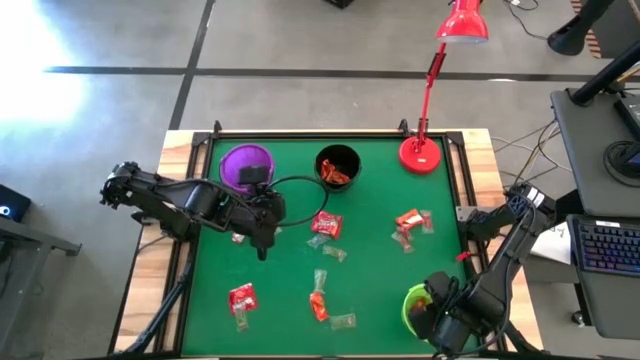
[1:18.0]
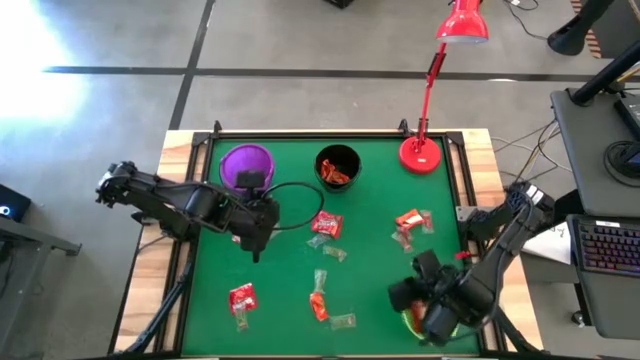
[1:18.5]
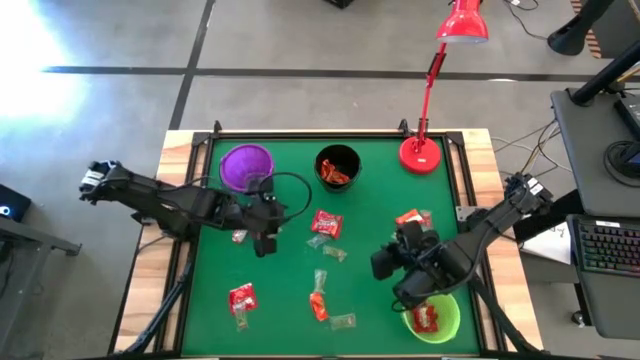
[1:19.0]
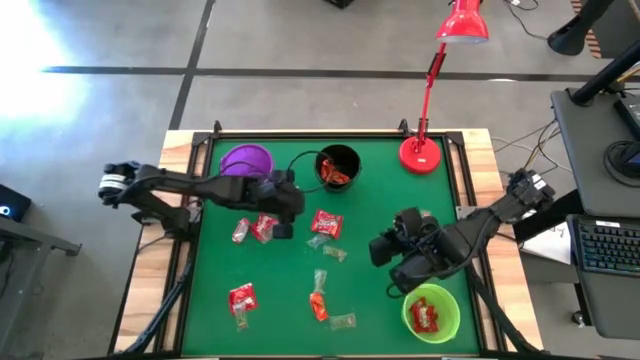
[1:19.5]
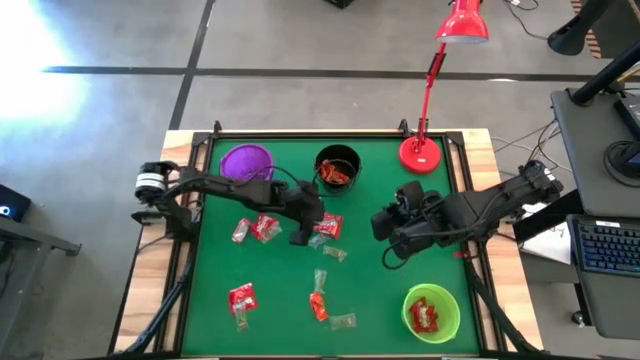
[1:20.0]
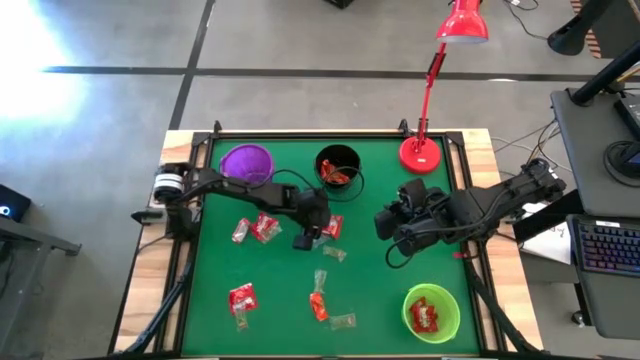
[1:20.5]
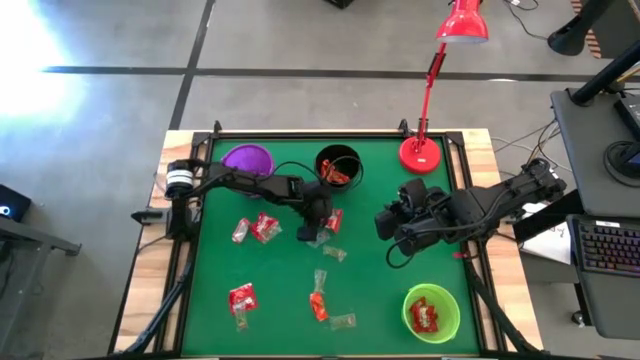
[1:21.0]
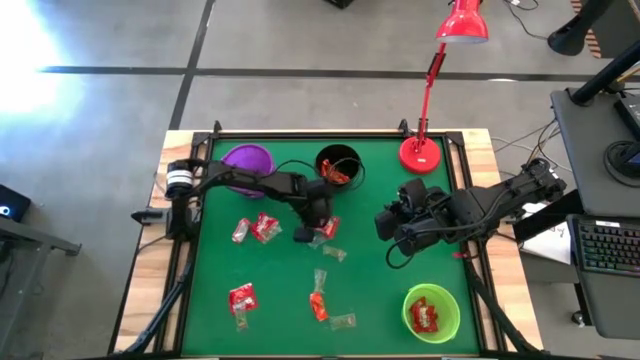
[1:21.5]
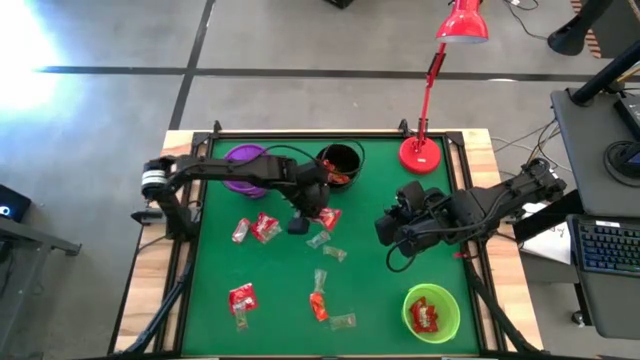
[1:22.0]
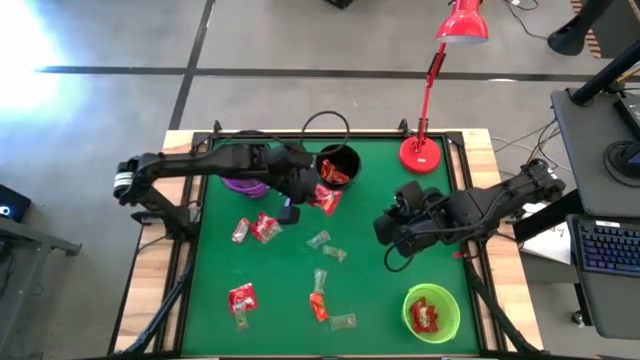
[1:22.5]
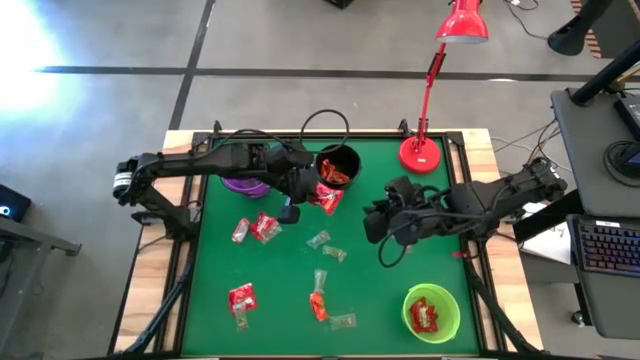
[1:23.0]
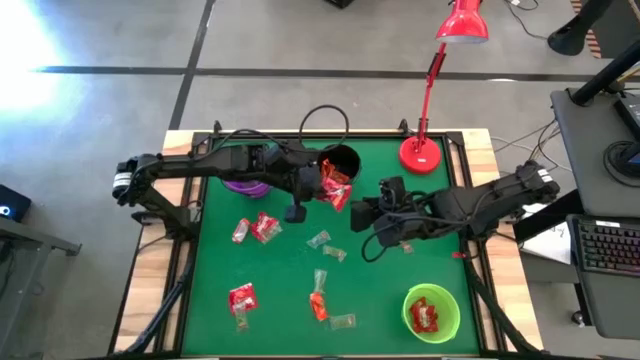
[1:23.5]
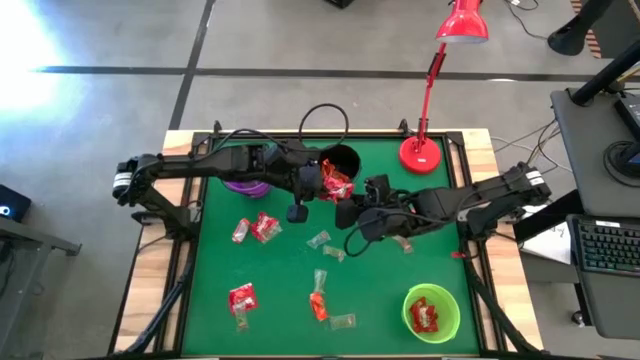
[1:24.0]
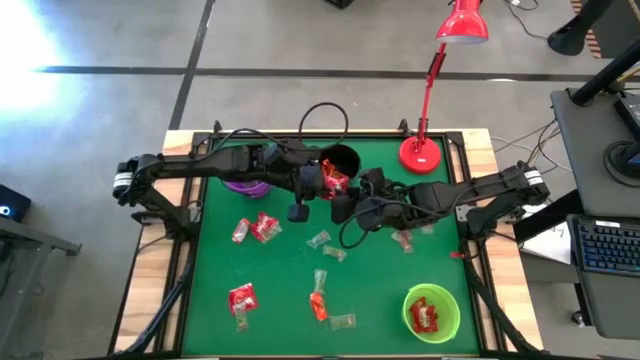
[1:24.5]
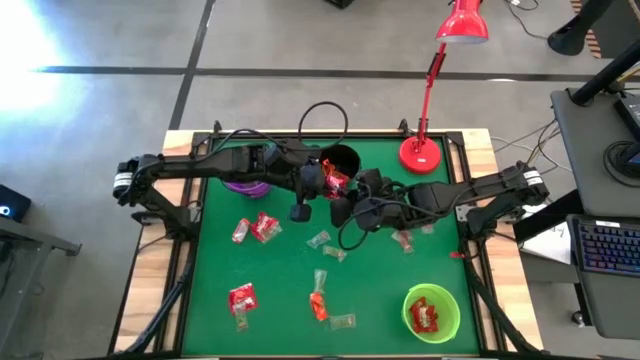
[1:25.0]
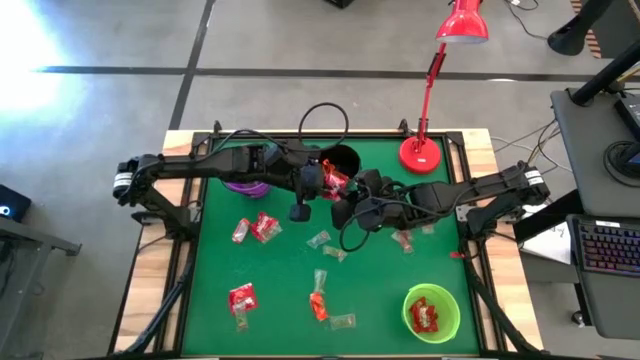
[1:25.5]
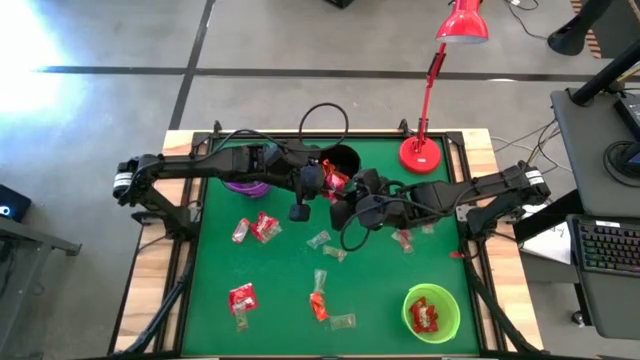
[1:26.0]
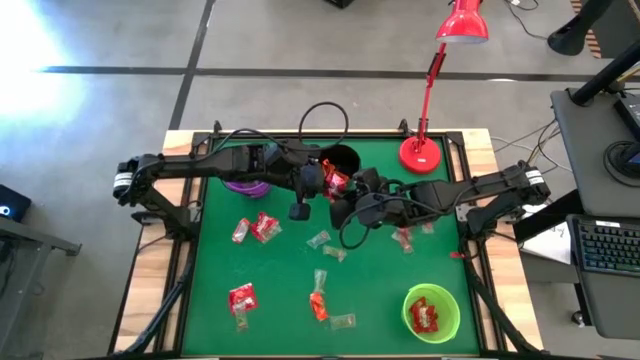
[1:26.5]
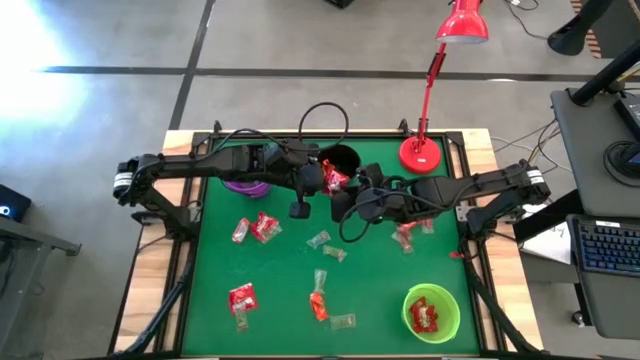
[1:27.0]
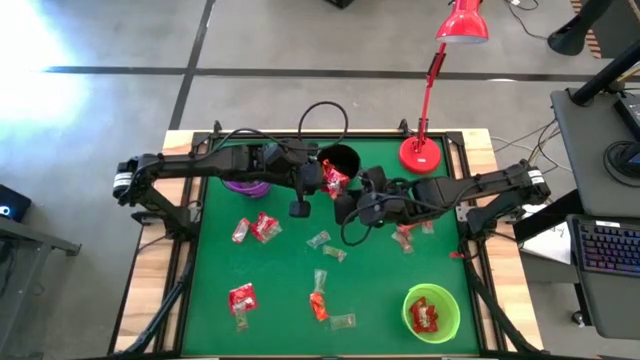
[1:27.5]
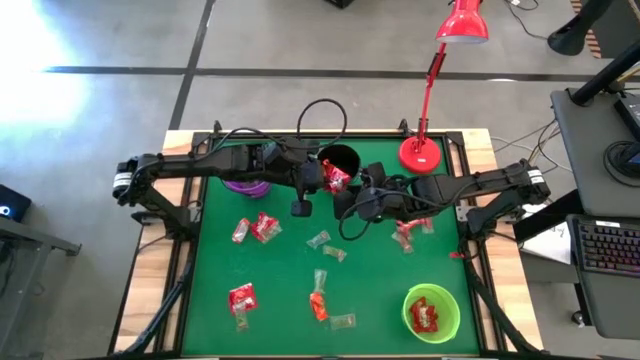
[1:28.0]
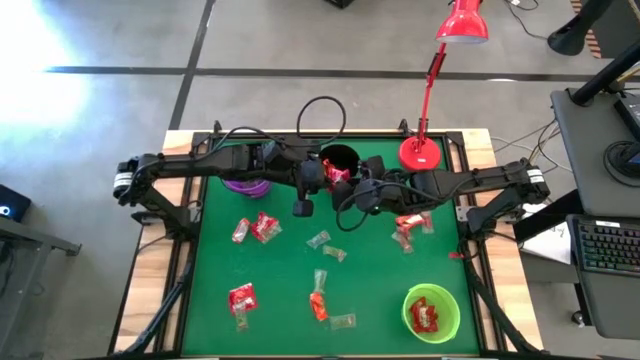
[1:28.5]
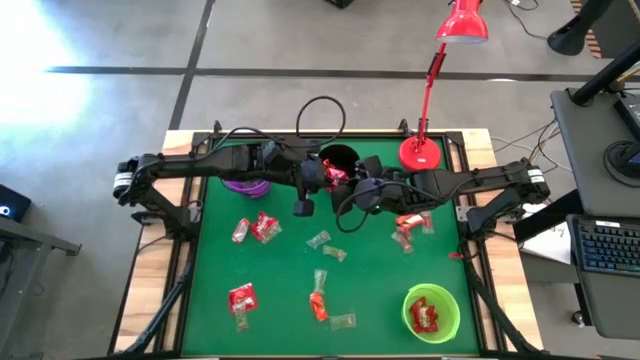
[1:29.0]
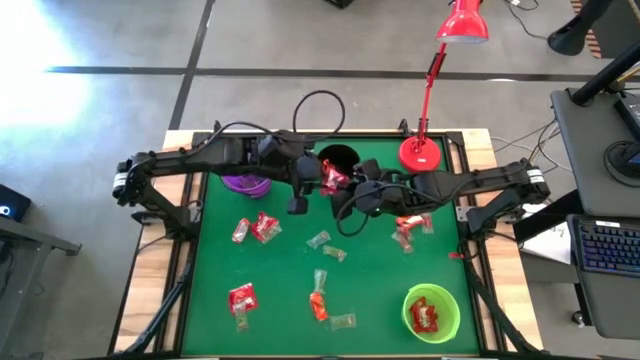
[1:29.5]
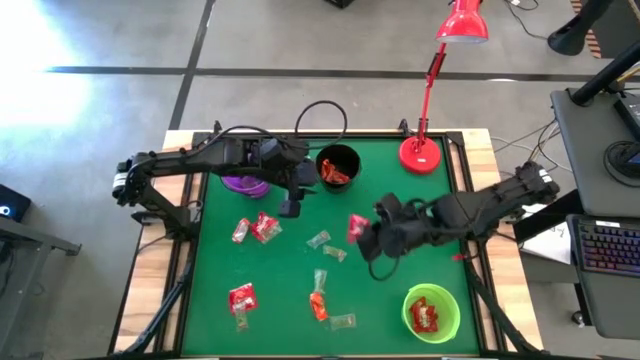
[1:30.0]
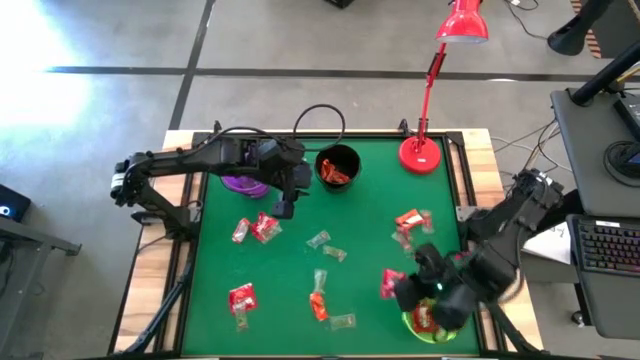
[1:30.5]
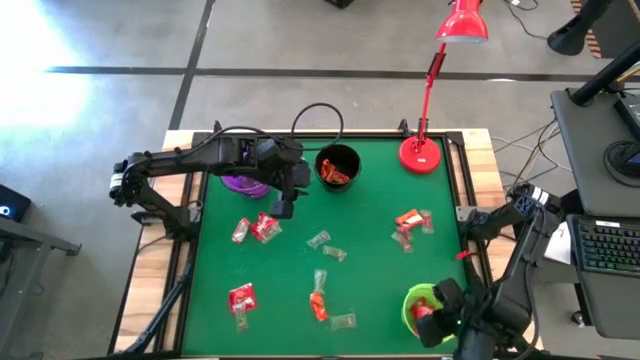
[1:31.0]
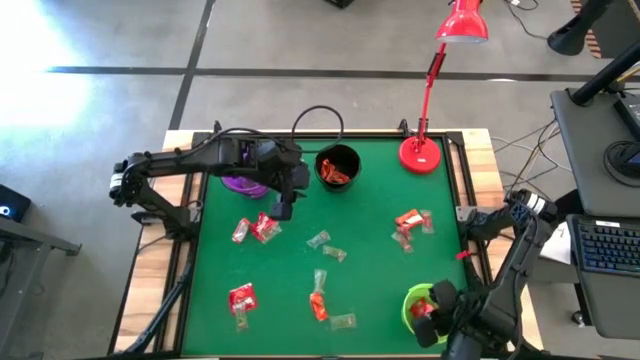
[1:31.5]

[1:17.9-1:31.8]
Task: Sort candy
Put the red candy into the green bucket

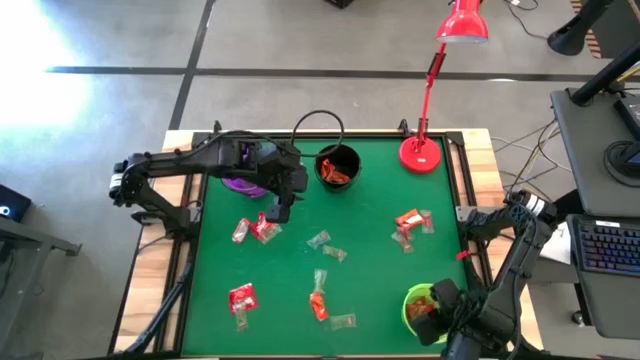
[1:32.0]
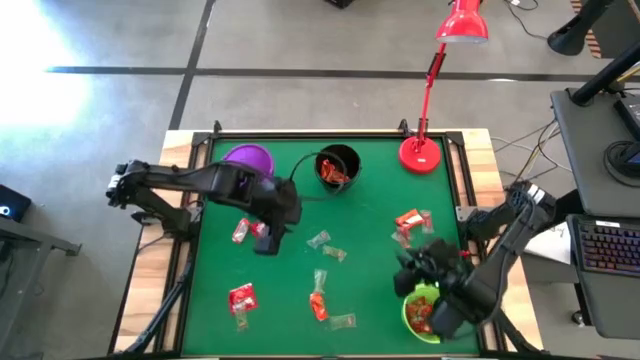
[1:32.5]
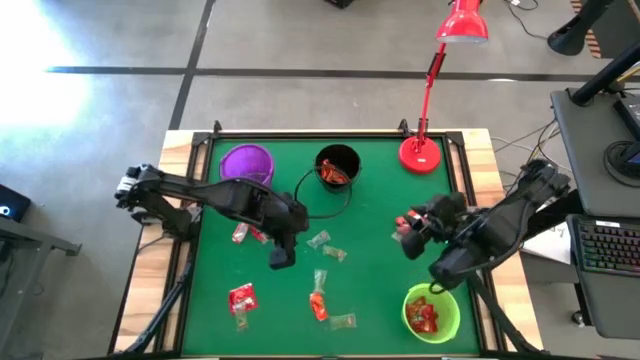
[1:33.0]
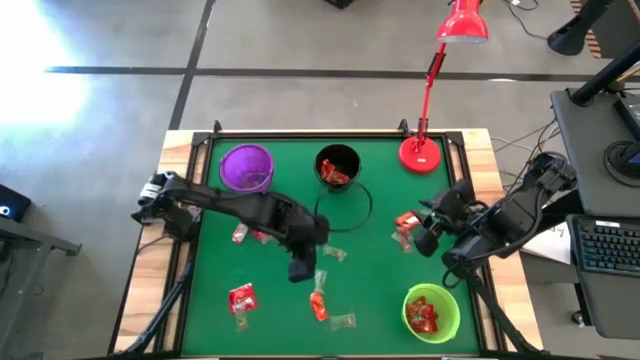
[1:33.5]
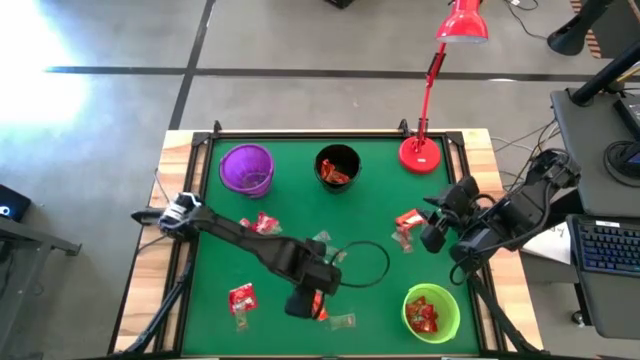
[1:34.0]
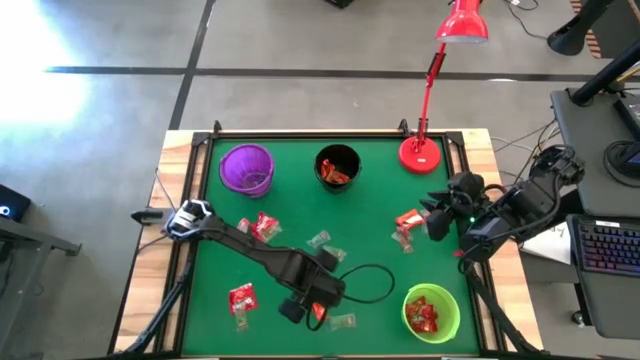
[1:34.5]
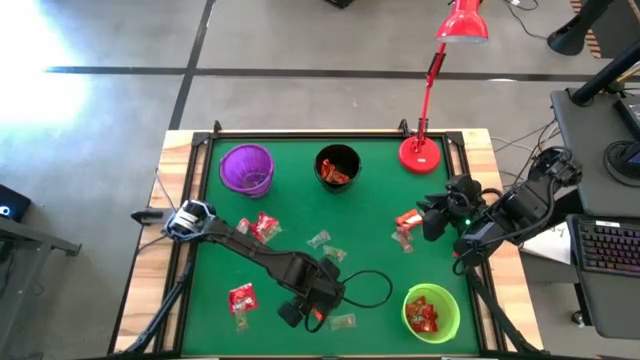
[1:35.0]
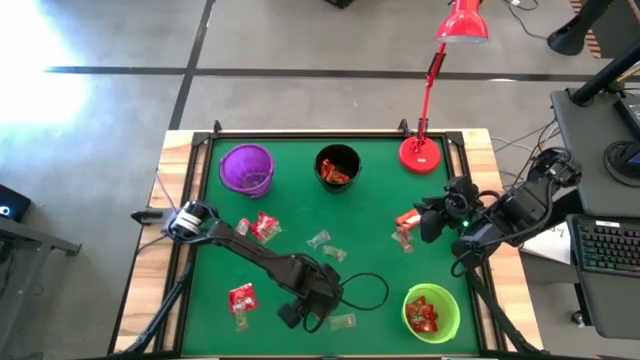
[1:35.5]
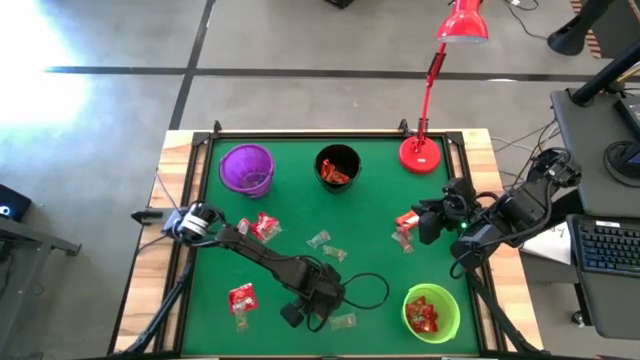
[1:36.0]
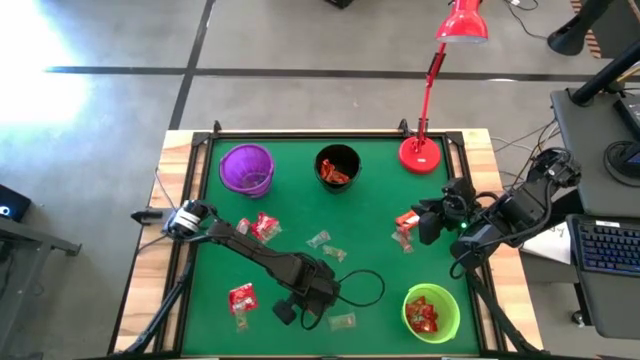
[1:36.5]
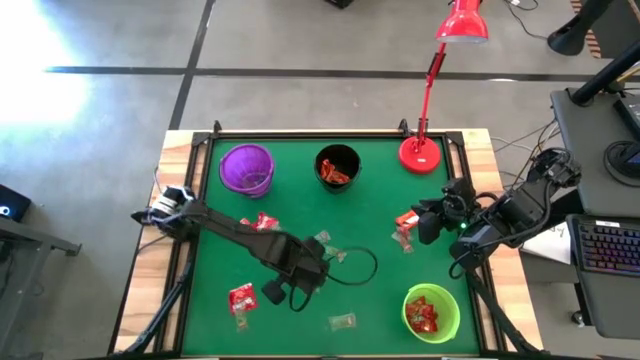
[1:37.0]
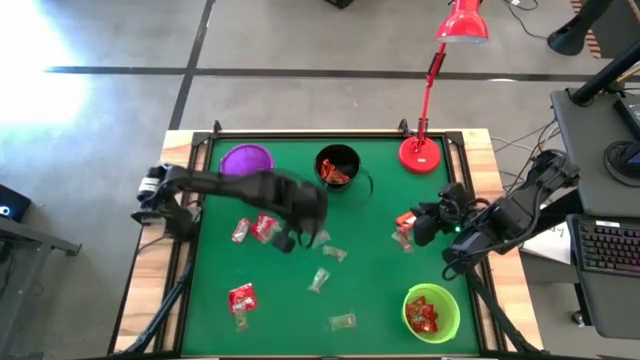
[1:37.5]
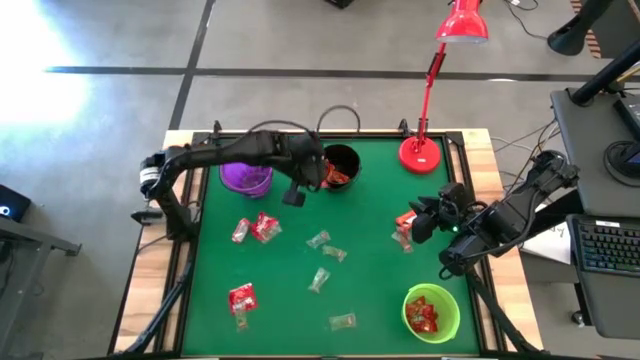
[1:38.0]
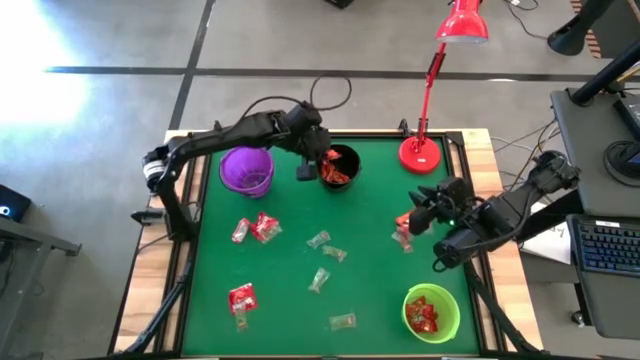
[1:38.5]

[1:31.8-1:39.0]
Put the orange chocolate into the black bucket
